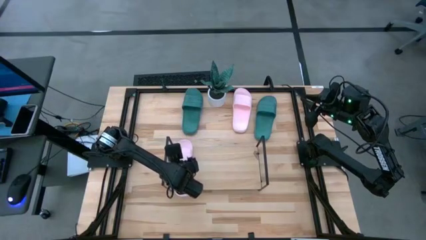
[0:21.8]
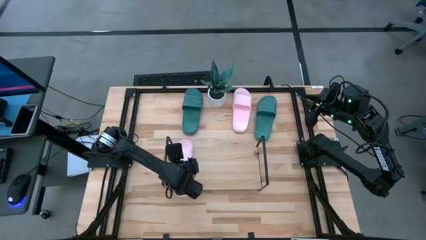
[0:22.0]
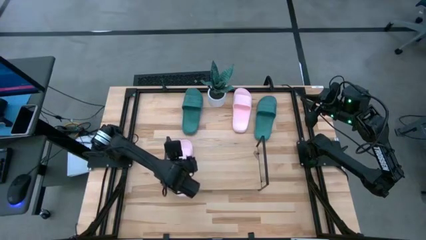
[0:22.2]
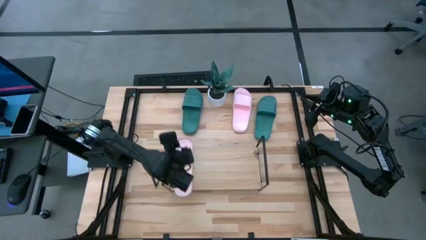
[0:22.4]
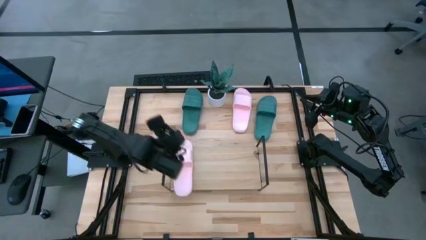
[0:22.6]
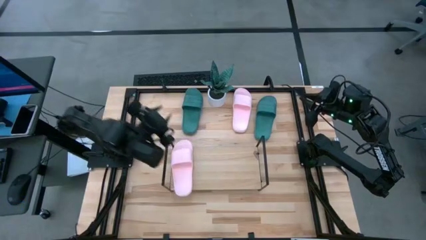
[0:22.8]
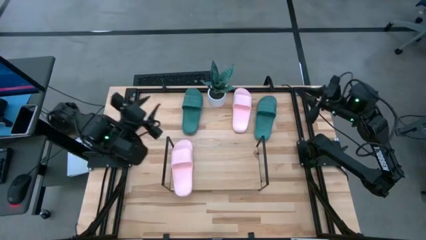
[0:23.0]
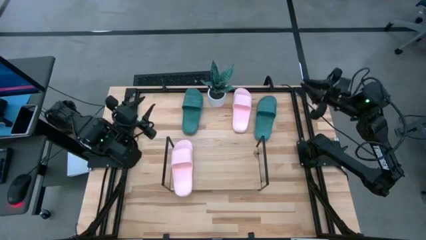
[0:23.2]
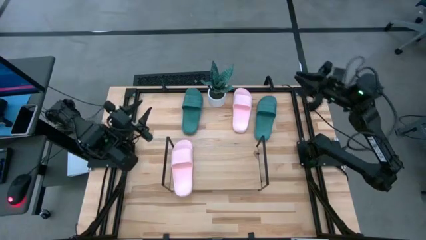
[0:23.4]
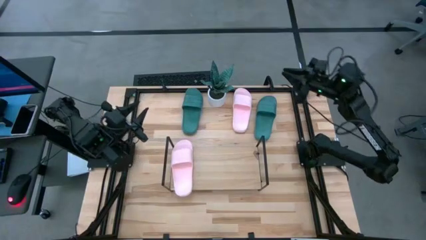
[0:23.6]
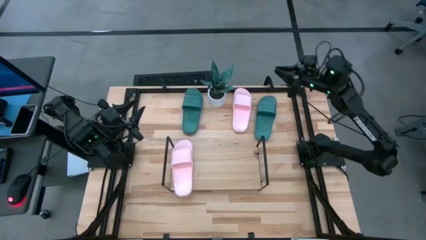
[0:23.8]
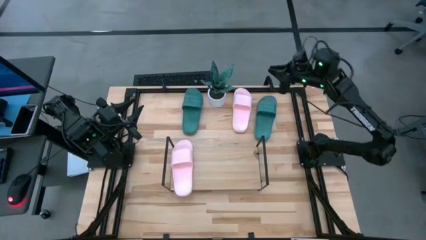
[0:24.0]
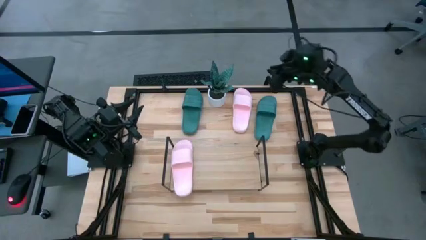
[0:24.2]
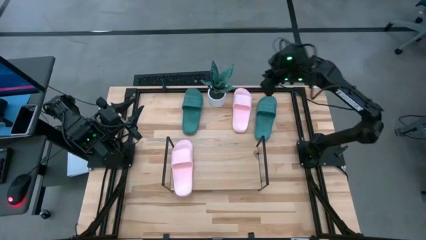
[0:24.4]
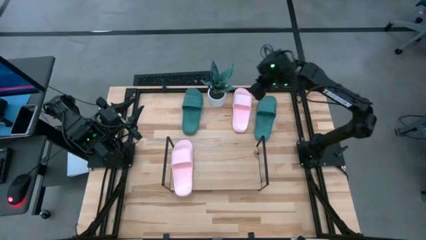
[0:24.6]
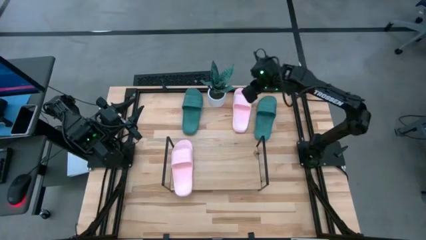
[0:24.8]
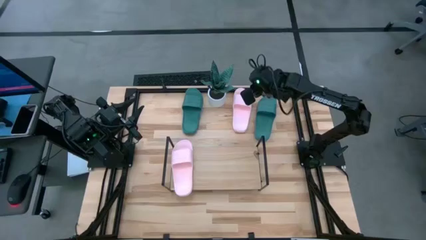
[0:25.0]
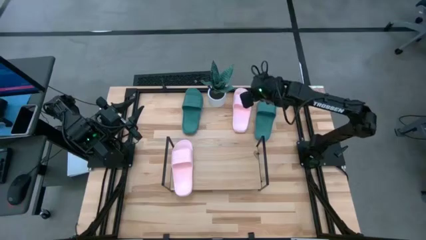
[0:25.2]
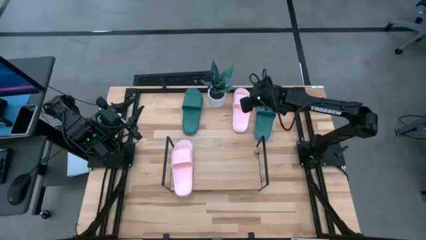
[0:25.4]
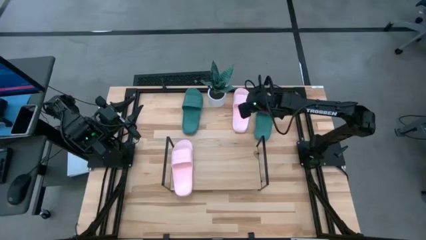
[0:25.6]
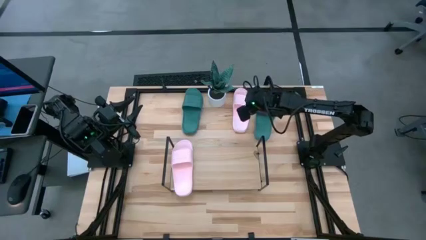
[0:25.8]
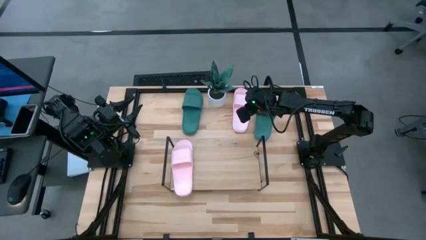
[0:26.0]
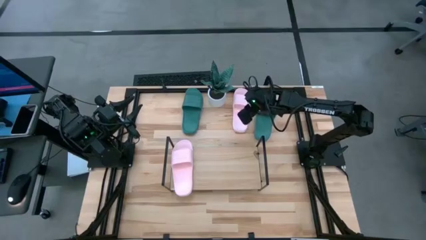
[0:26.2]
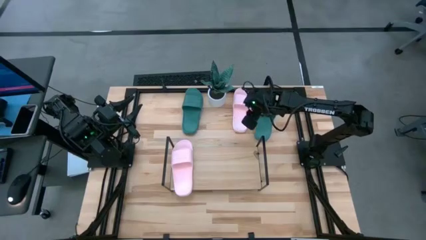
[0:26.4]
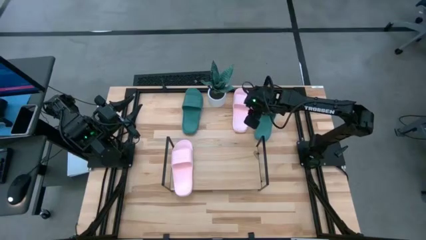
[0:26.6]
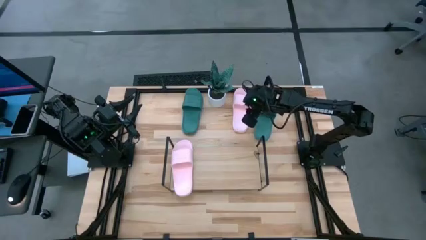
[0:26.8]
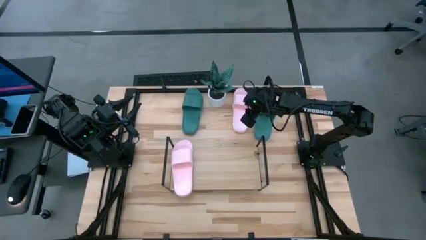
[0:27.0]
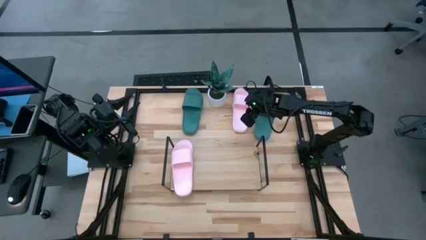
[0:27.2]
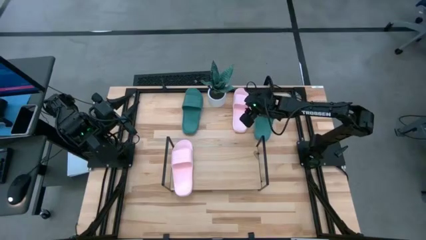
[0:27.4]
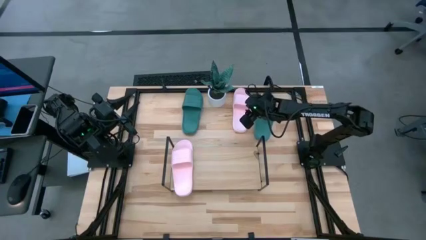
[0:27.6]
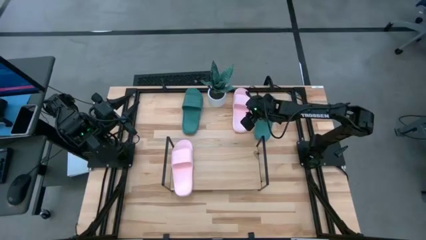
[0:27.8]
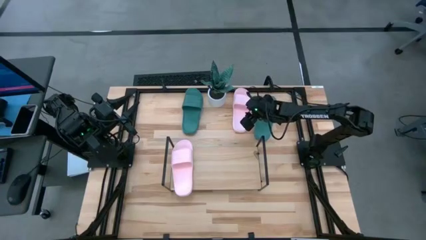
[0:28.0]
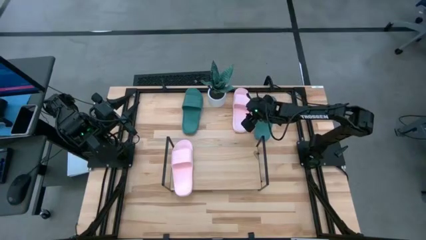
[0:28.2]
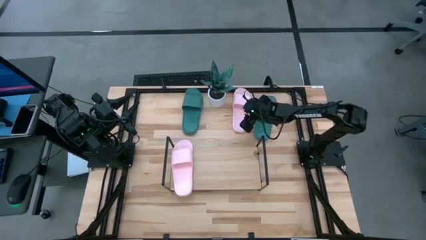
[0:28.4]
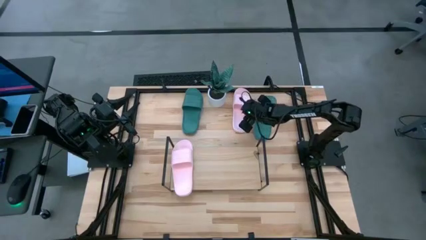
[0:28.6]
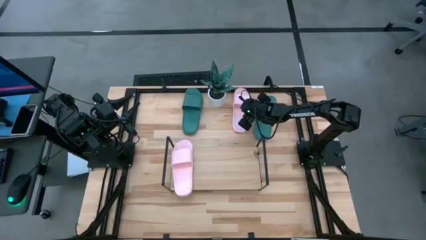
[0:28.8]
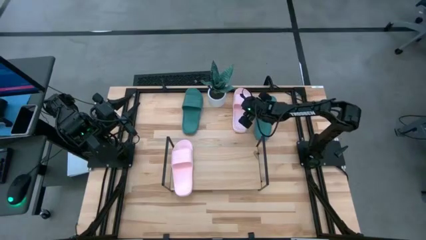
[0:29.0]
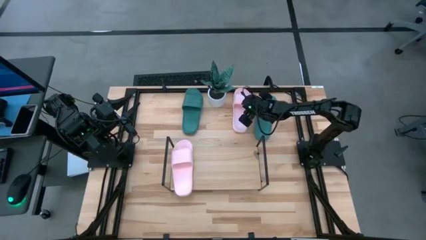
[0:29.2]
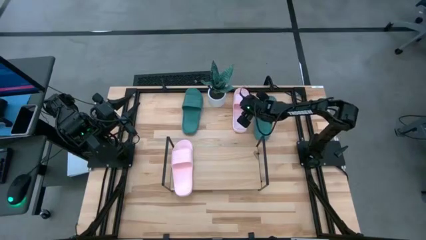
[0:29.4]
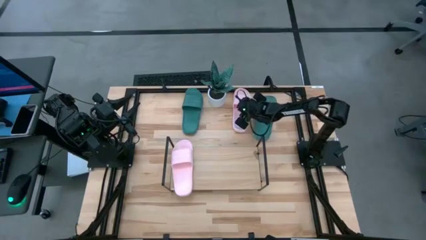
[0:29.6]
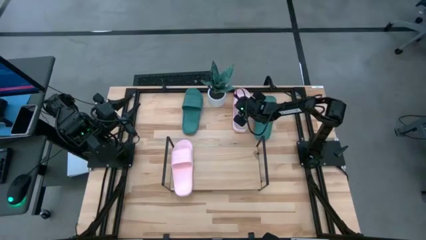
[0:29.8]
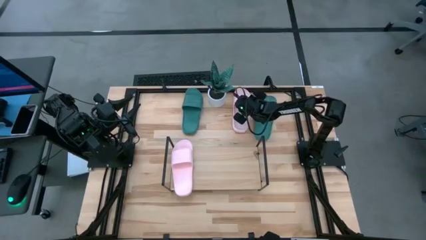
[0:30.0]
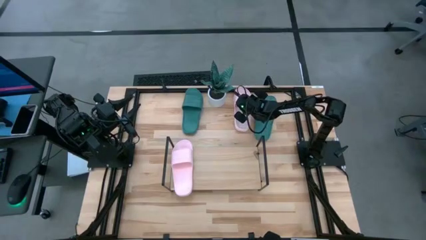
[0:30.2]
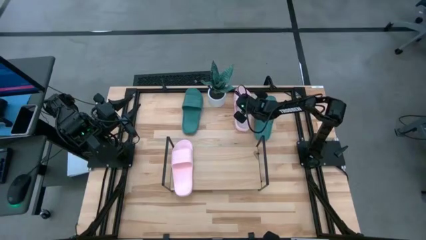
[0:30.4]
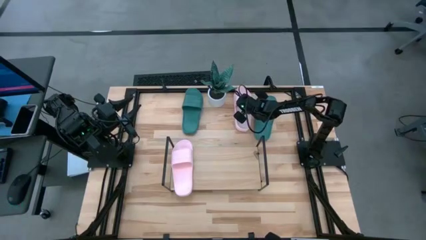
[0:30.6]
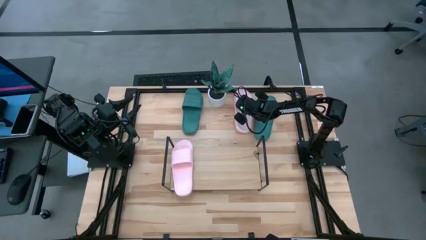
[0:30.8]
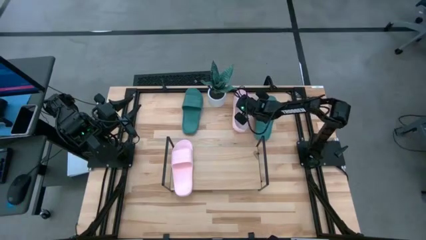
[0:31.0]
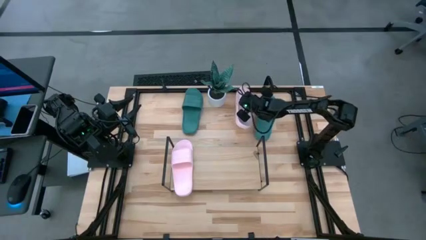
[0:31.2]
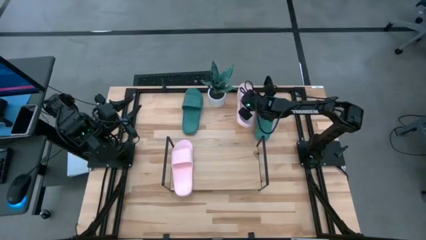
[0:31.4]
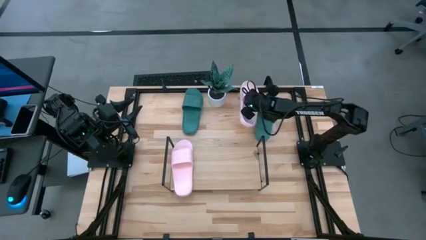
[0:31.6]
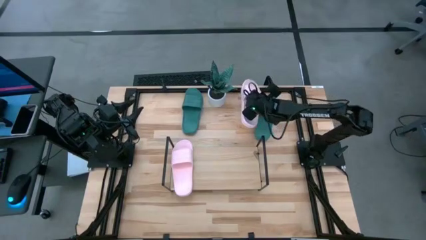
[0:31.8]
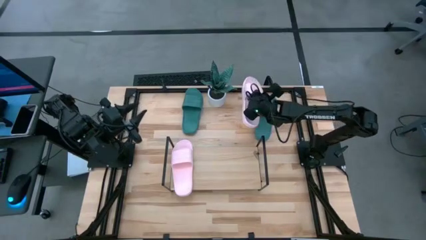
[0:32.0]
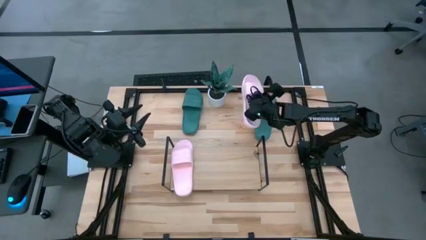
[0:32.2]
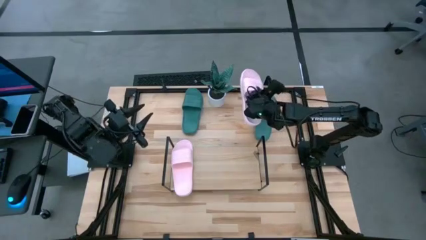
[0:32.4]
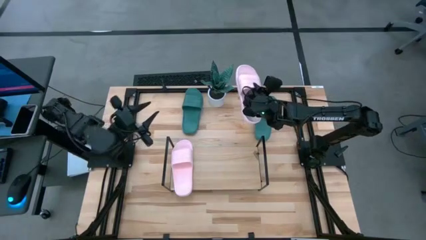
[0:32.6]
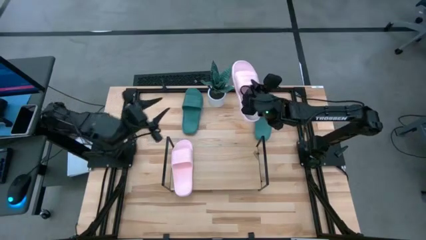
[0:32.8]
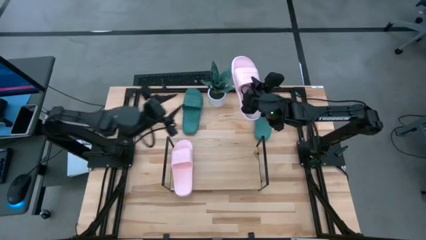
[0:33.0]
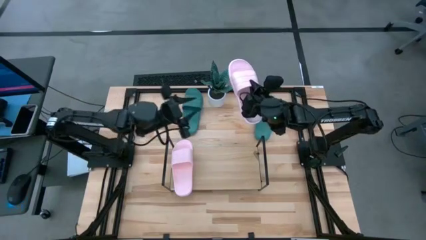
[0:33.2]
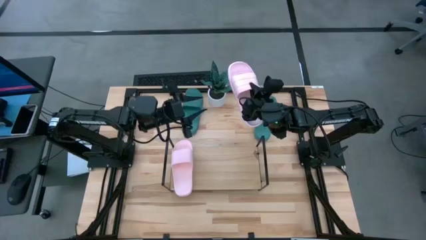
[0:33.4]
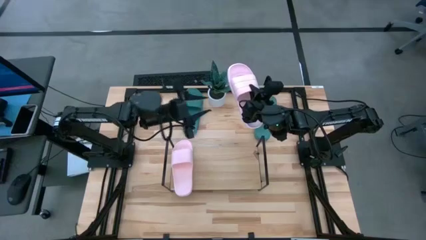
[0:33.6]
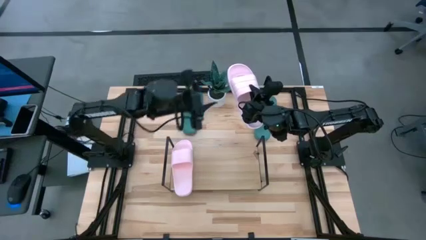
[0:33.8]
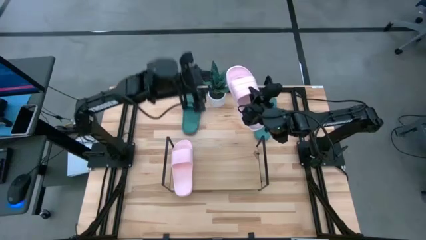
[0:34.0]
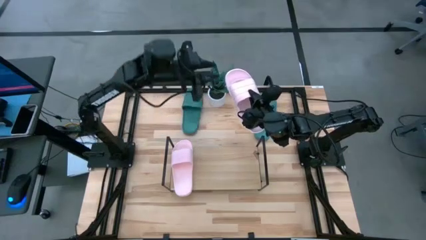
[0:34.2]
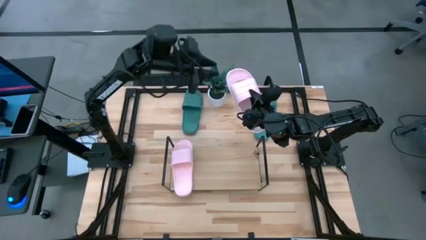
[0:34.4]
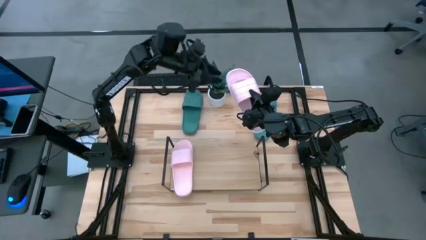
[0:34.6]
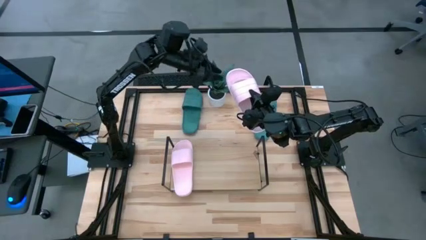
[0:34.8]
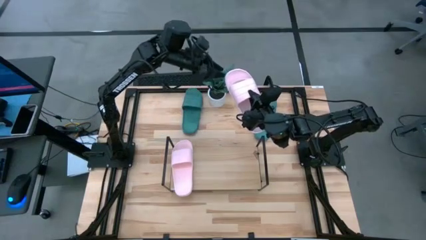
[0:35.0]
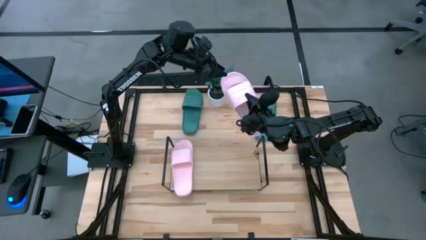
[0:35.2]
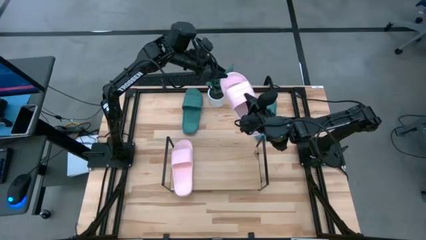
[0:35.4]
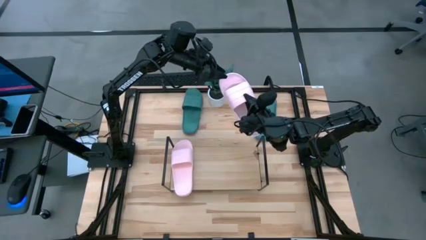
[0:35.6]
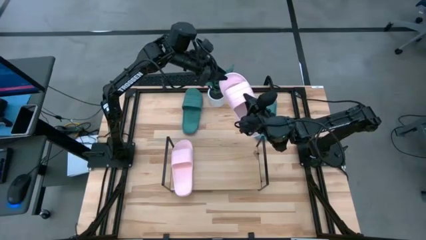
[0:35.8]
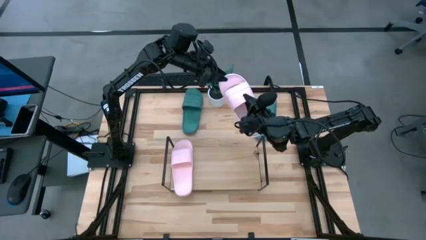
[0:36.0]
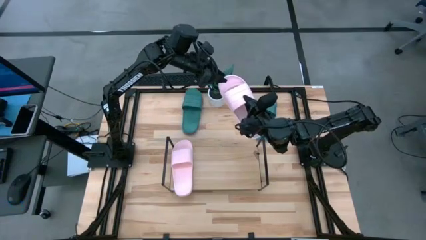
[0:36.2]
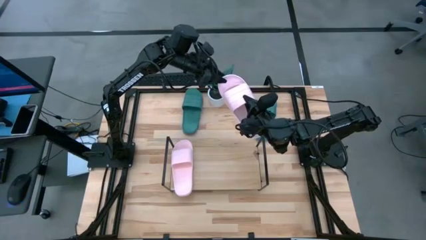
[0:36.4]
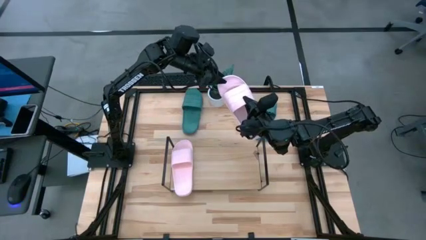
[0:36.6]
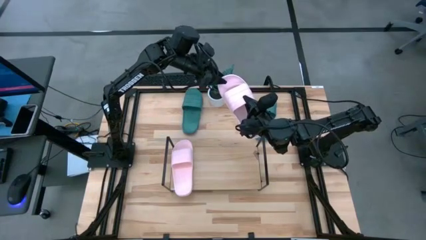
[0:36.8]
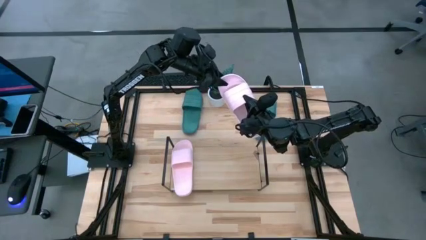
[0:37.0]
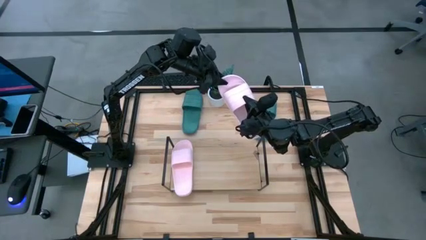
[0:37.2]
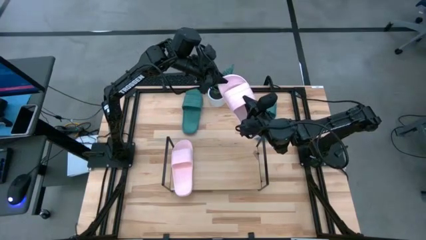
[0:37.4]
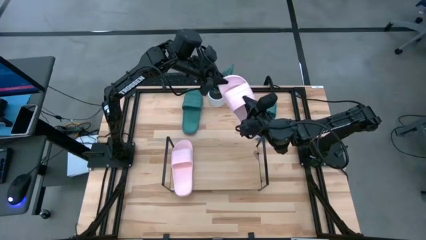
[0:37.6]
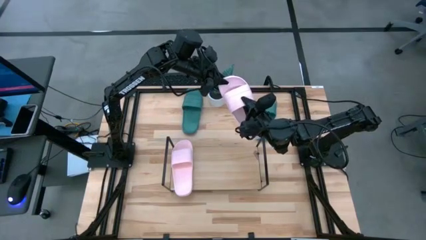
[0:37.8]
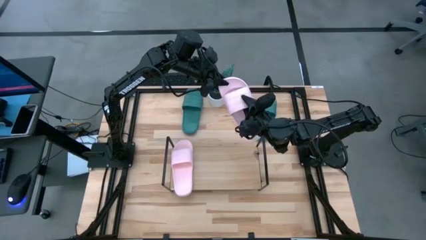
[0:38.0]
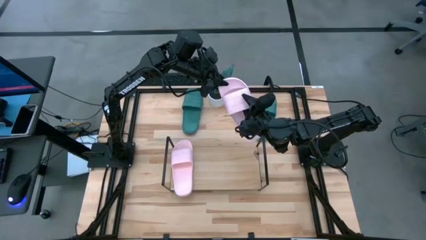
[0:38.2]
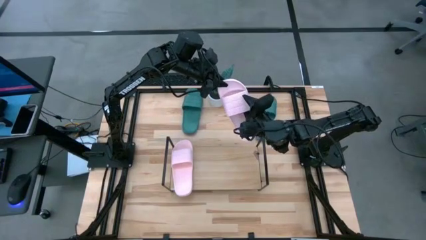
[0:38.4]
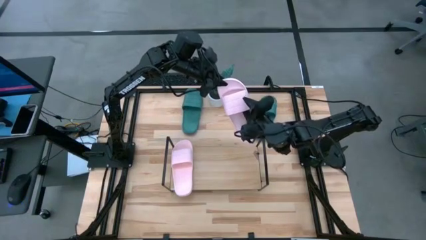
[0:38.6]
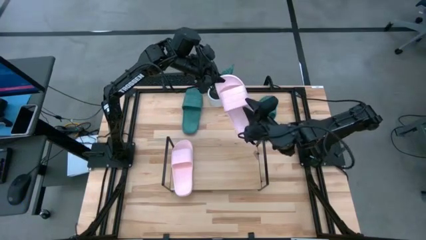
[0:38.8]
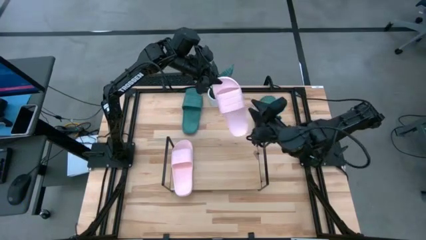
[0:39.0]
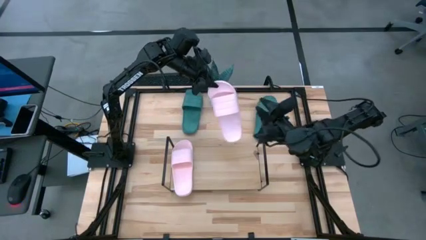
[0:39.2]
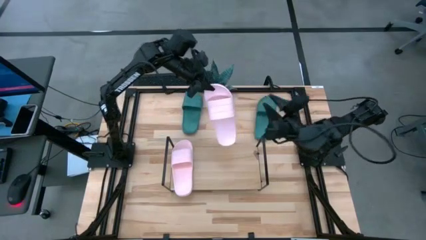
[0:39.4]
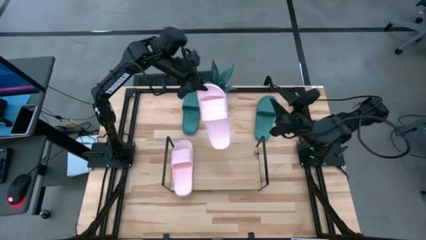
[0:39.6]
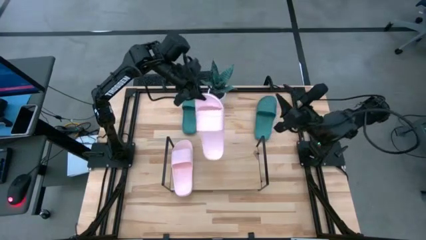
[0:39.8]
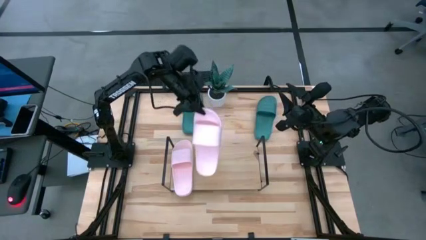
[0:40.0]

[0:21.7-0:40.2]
Task: Pick and place slides into the shelf
Put the pink slide on the shelf
